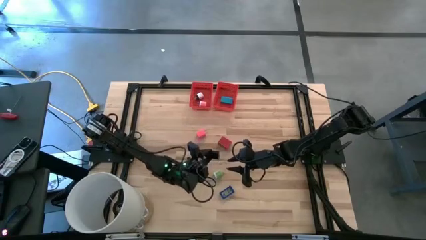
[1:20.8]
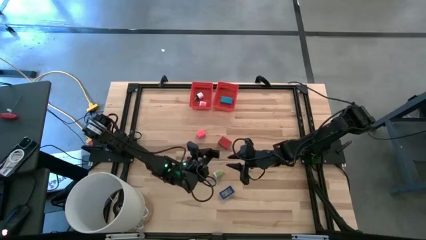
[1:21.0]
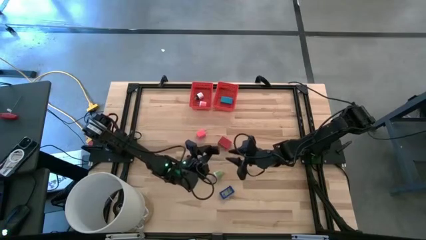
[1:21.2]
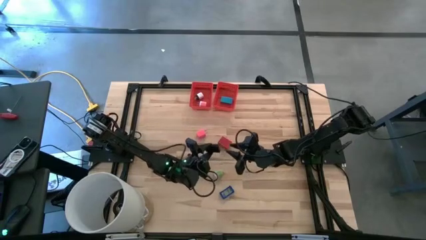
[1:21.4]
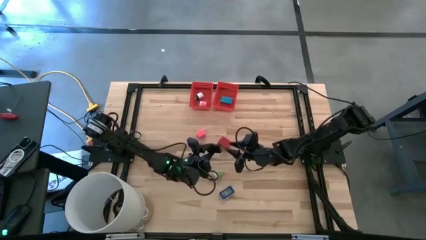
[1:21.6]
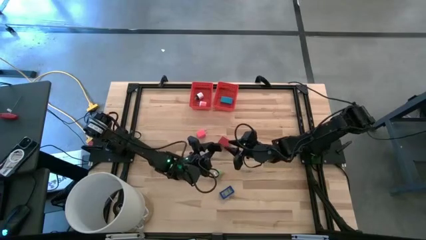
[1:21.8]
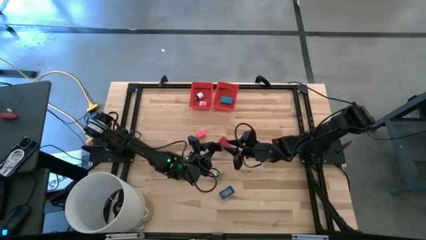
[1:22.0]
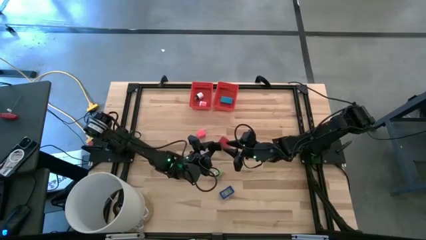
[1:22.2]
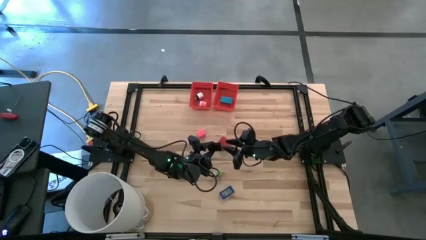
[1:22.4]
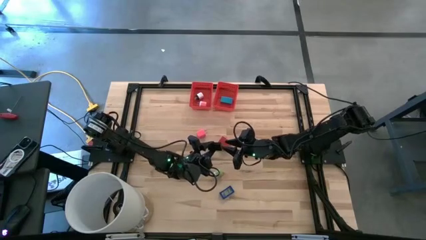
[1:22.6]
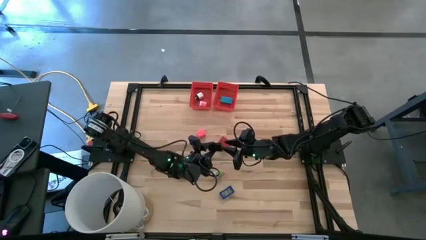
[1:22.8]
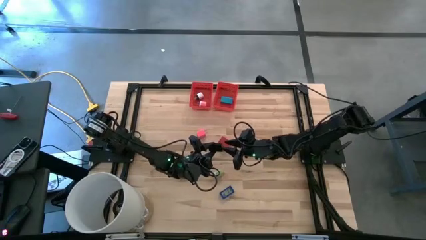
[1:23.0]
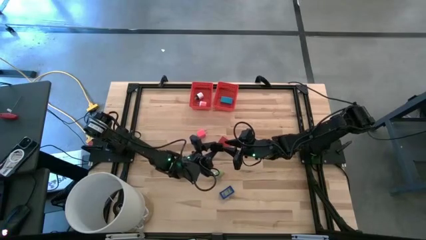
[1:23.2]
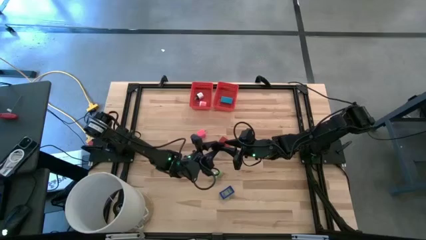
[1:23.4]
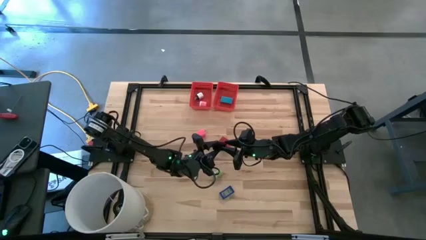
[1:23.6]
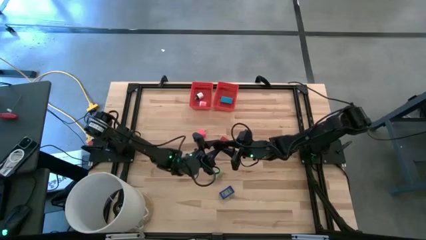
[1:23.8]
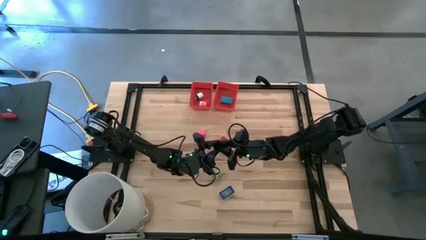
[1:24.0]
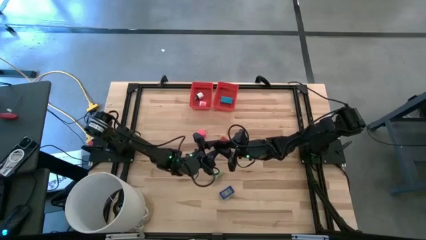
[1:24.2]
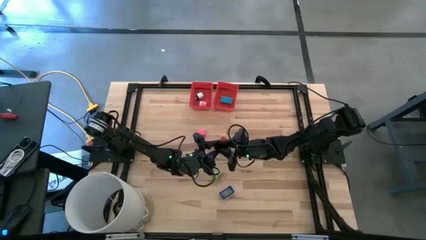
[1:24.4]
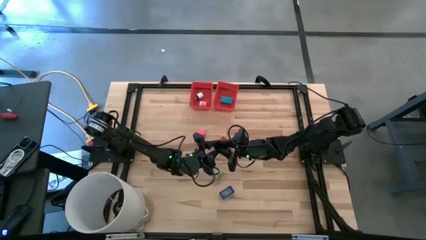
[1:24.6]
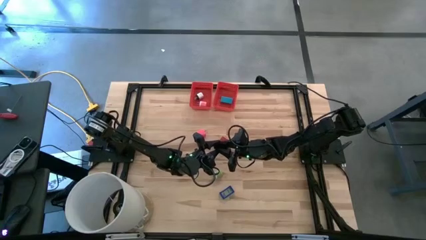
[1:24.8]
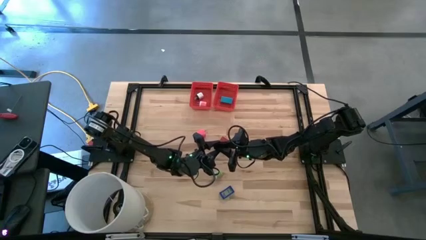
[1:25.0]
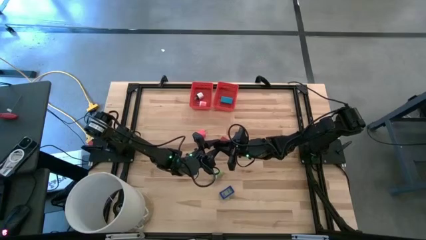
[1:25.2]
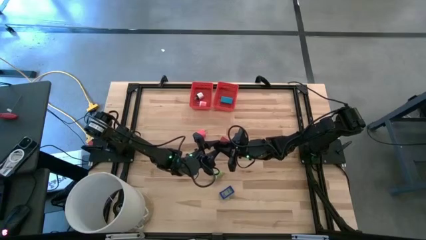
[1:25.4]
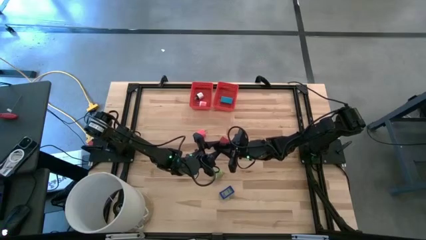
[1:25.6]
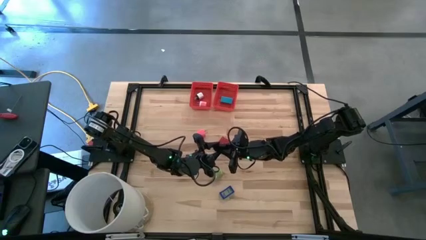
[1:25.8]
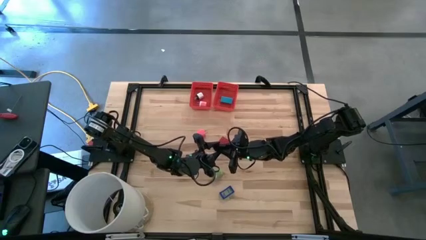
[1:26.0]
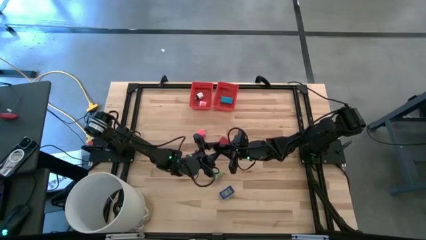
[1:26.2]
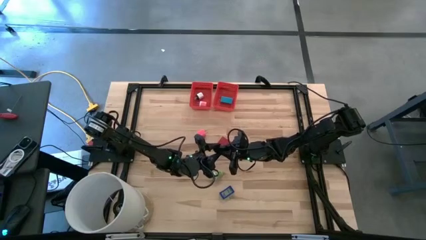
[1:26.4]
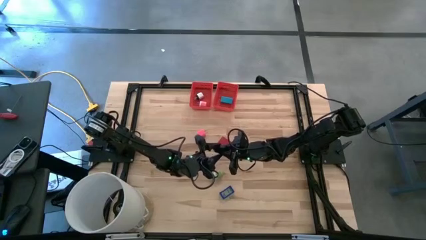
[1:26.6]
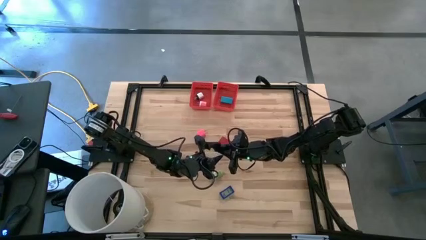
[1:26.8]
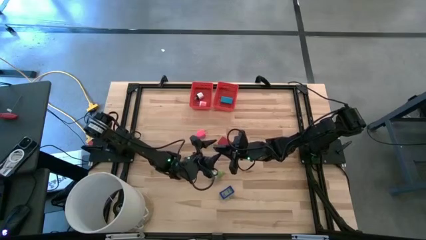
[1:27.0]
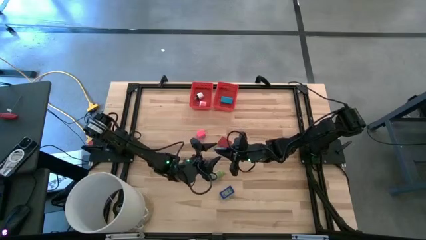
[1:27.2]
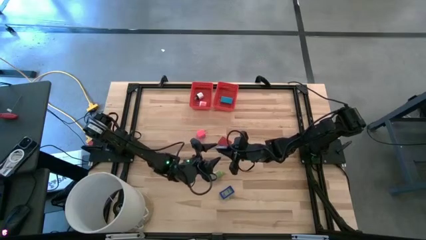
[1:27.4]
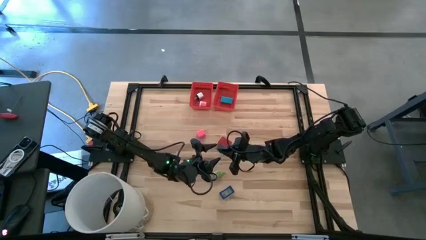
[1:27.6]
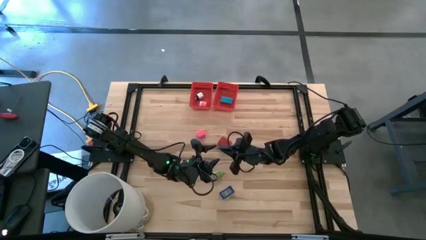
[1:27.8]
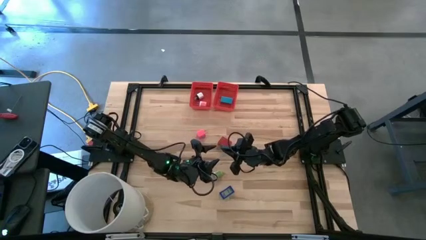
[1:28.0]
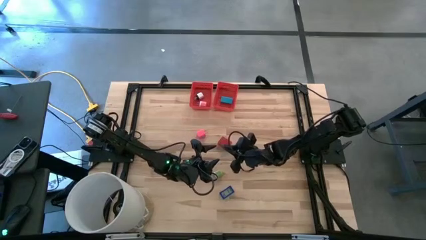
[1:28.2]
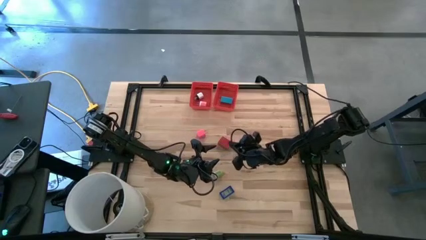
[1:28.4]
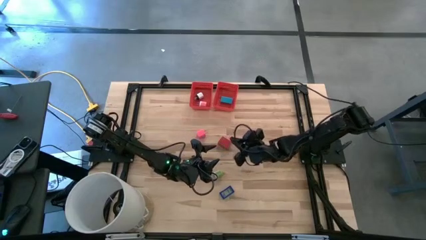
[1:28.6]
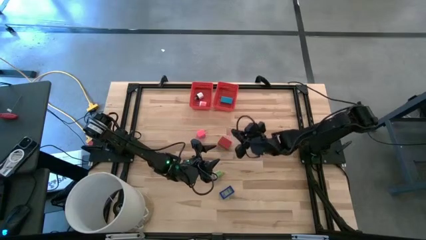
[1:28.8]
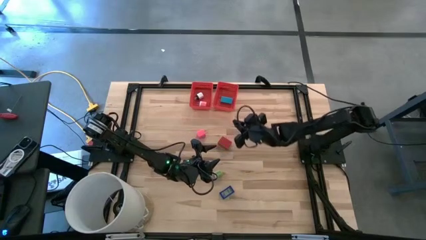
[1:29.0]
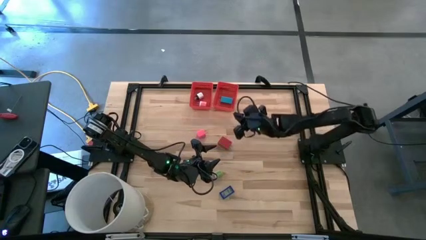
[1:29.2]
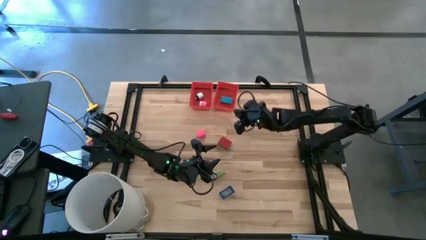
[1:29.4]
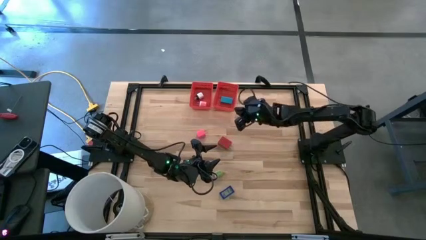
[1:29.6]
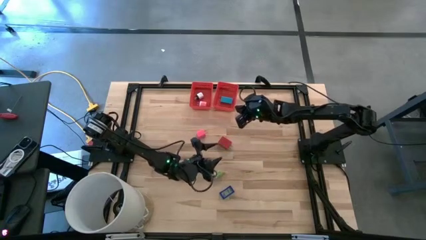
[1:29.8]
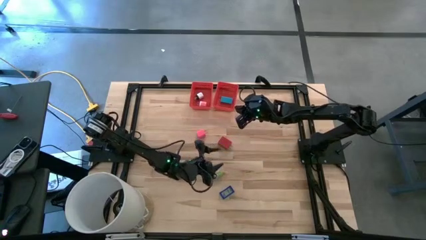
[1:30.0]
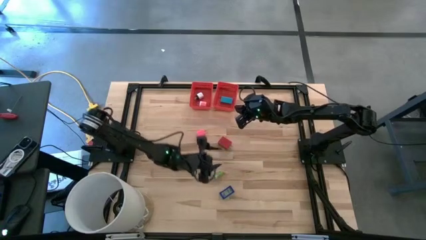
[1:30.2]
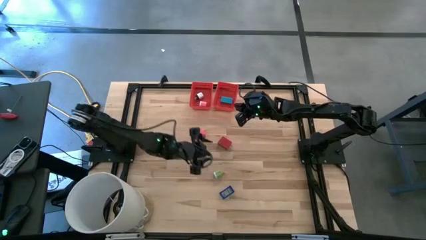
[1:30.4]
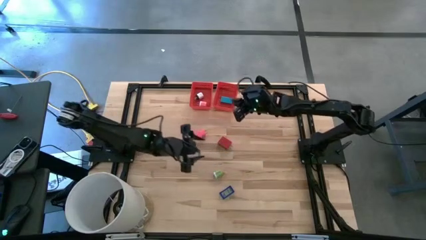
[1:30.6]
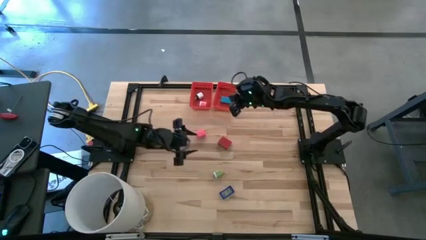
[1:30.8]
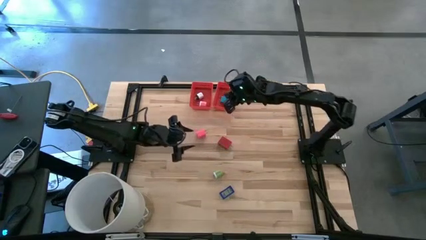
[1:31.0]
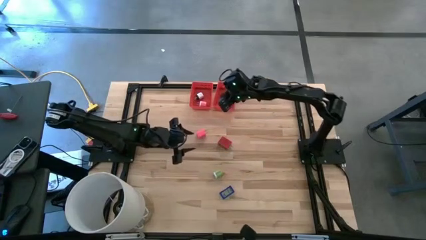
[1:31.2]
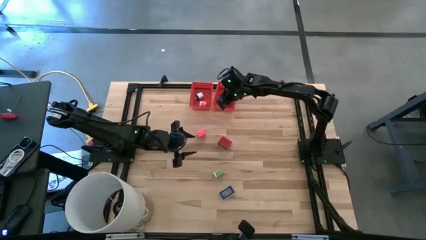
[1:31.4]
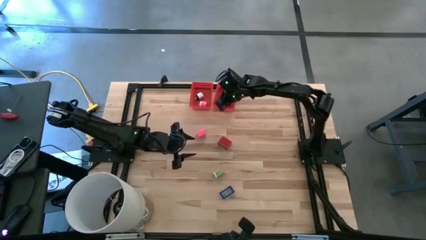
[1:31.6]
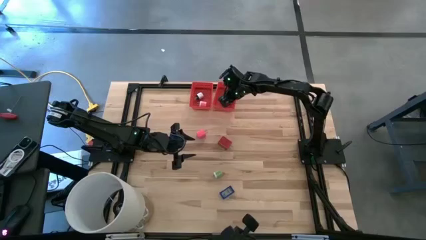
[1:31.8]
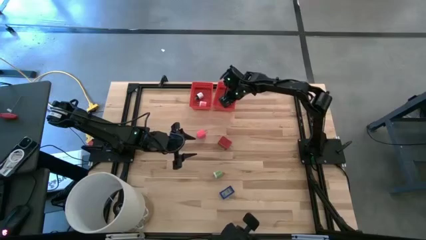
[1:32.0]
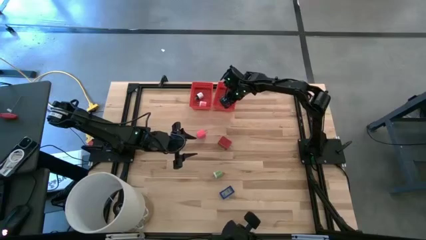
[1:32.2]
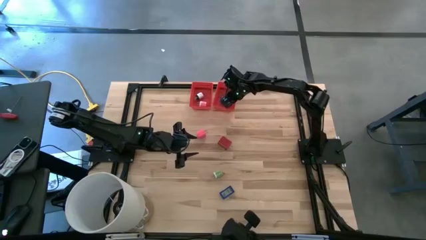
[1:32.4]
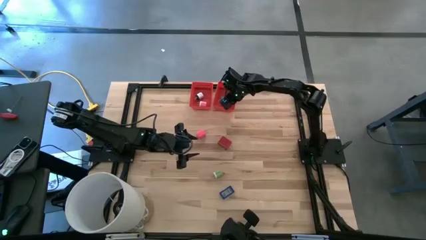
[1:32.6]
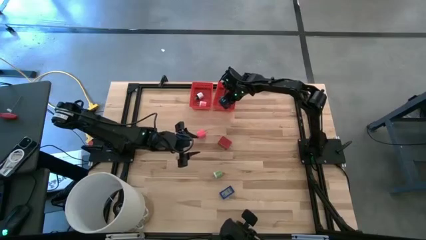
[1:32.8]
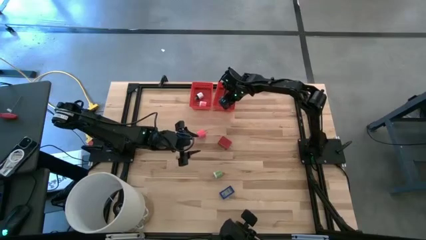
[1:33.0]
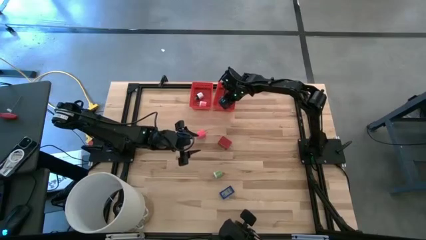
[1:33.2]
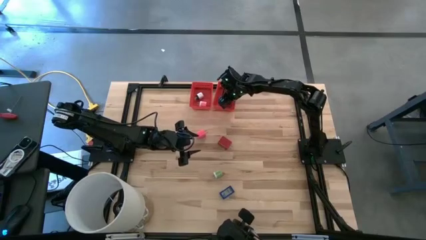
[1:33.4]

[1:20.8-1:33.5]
Task: Pick & Place Office items
Put the black digital clock into the right red basket

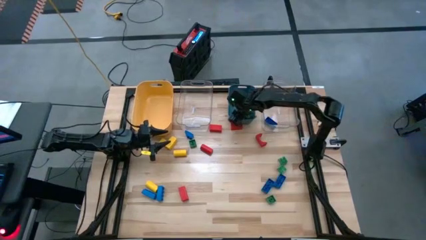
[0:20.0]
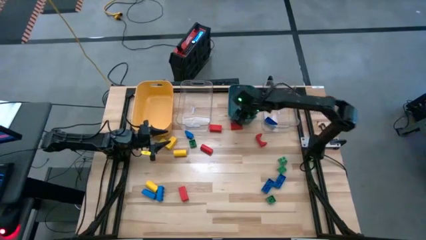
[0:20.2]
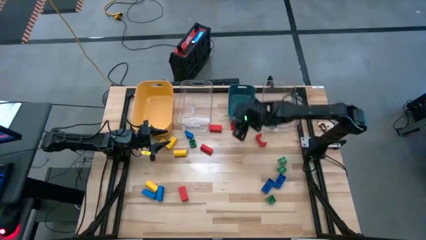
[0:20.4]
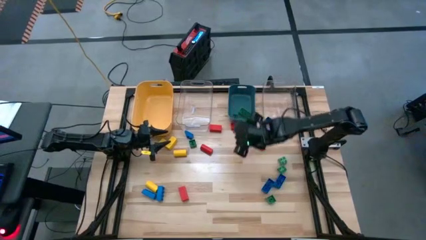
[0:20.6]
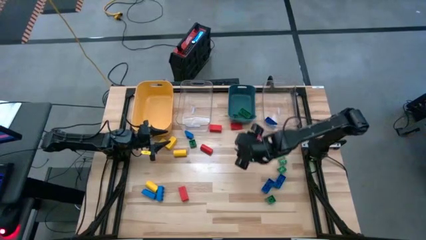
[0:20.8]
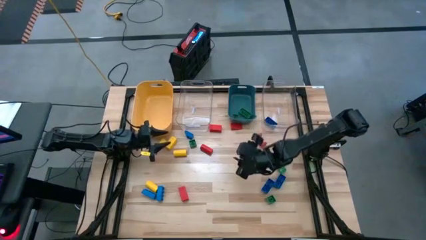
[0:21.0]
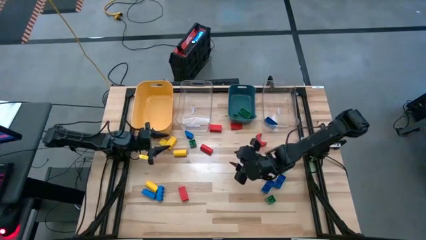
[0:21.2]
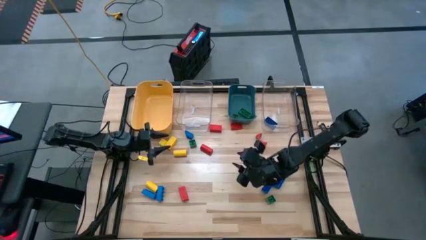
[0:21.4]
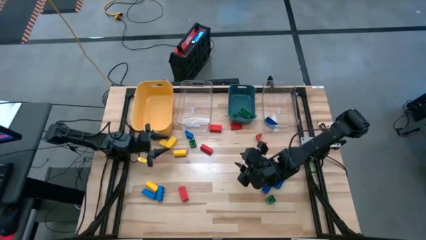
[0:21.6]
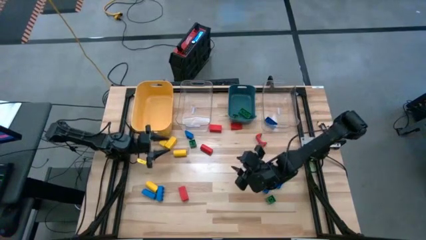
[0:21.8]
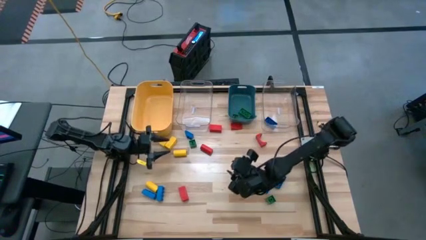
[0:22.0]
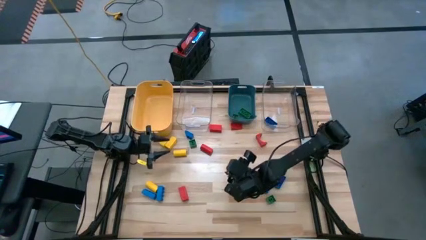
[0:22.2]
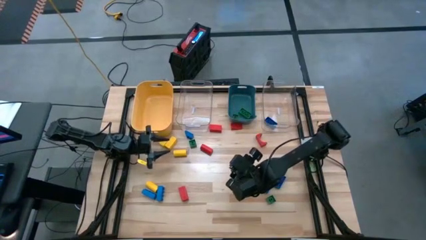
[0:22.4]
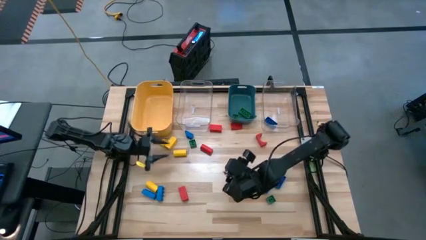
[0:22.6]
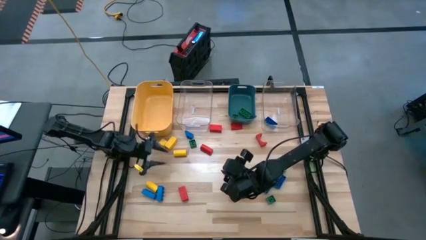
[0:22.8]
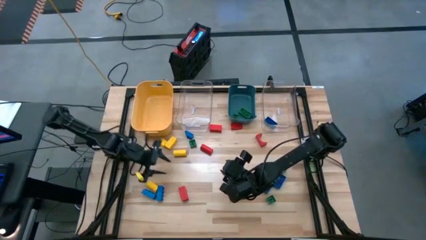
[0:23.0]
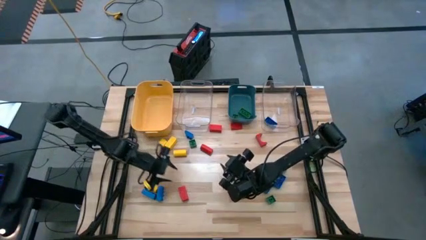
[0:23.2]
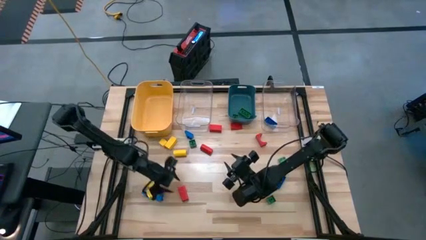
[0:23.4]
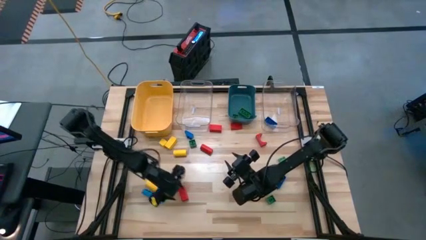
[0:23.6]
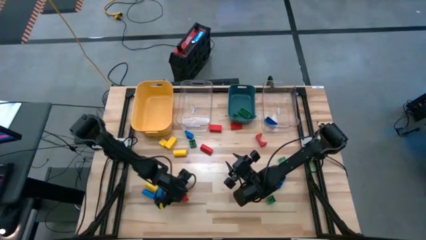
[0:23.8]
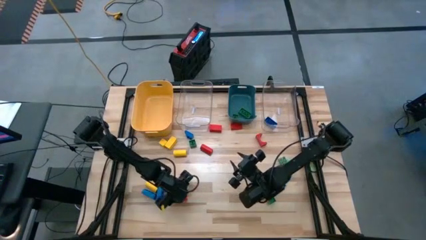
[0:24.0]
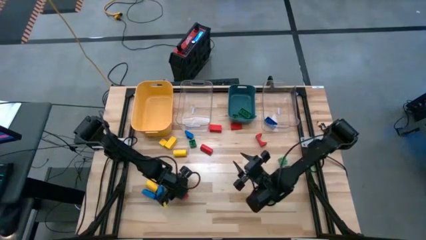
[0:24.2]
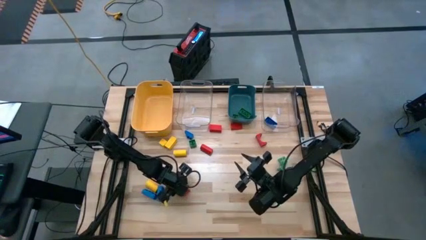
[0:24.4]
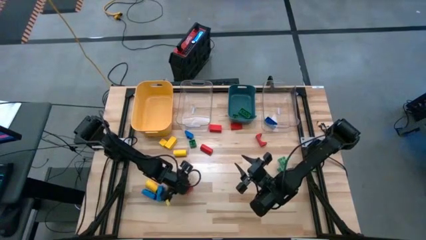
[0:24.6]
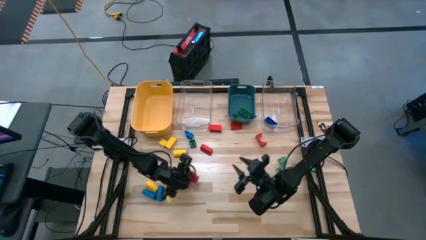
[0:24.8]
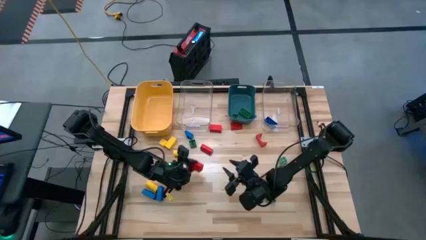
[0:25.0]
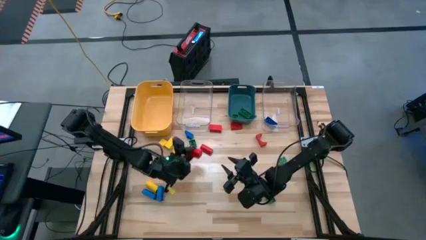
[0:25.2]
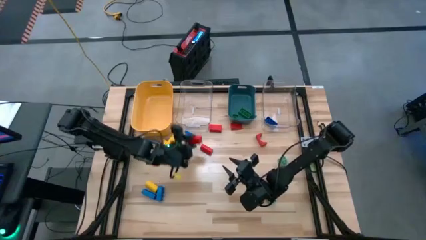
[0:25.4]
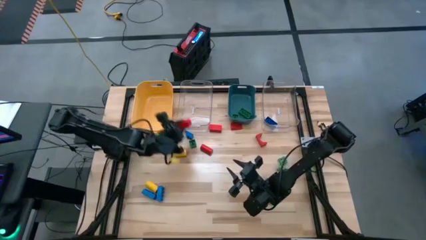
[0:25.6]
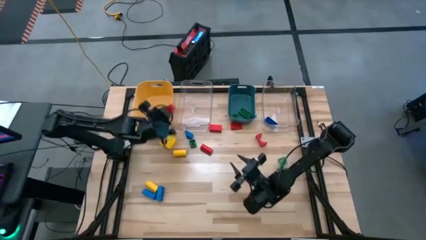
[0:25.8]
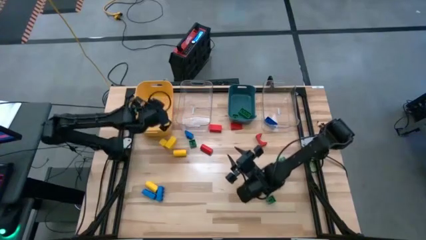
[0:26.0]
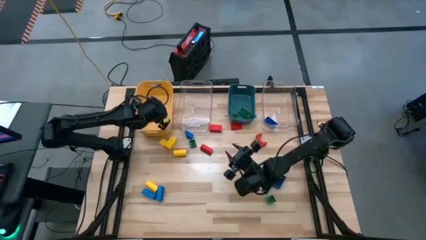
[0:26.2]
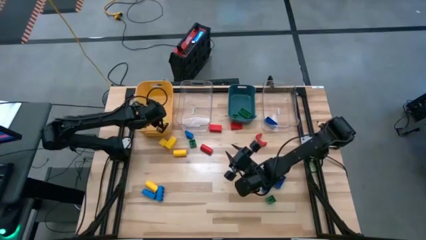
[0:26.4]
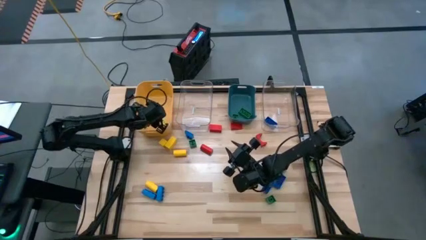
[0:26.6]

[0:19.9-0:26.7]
Task: Sort blocks
Put the red block into the yellow bin
